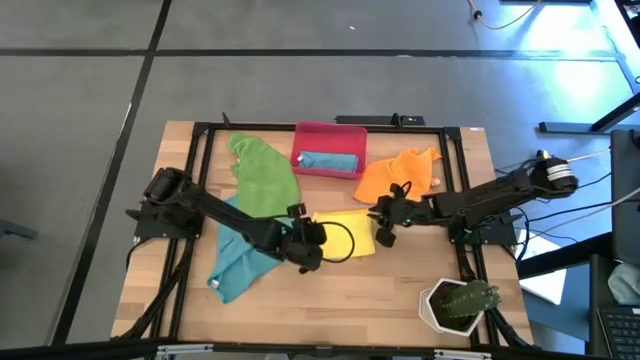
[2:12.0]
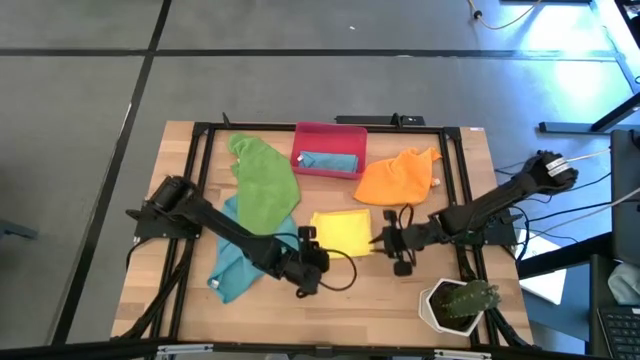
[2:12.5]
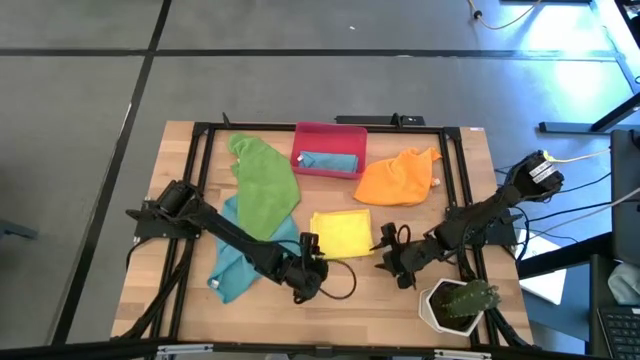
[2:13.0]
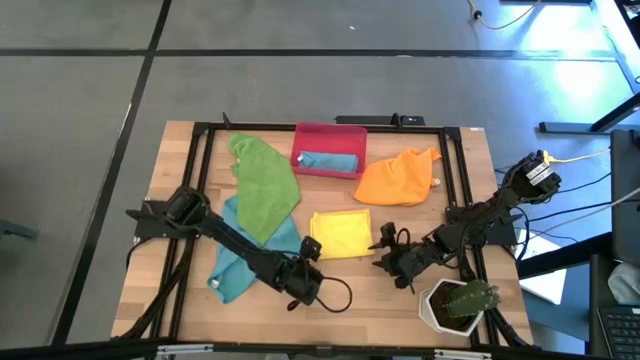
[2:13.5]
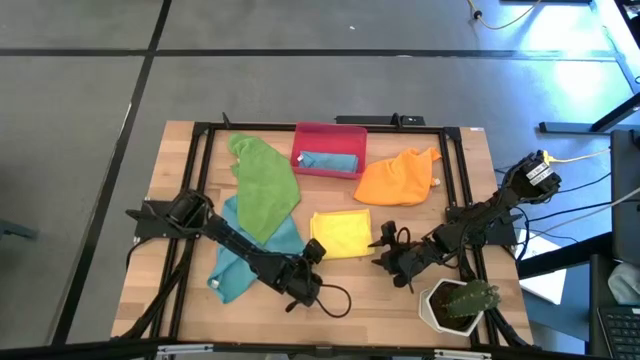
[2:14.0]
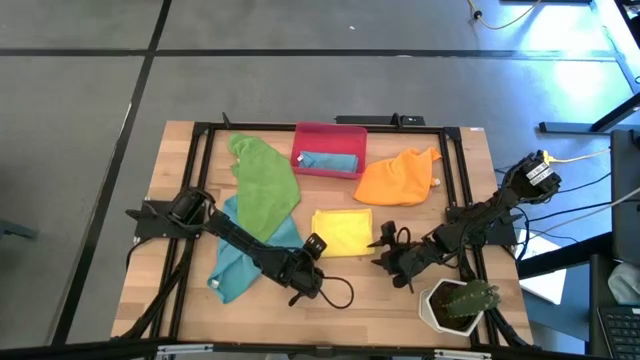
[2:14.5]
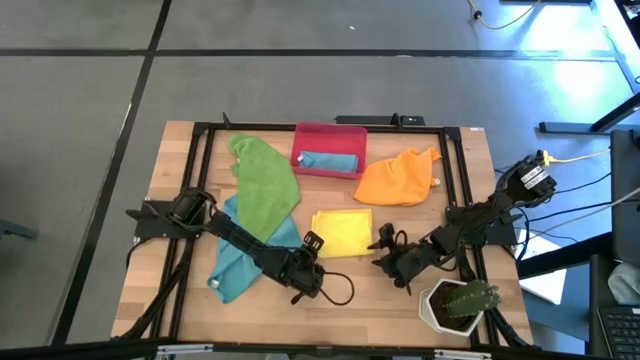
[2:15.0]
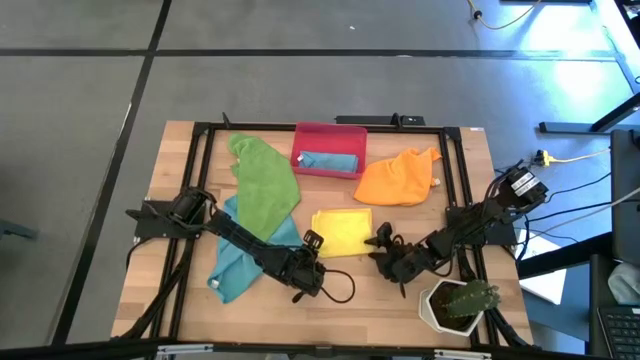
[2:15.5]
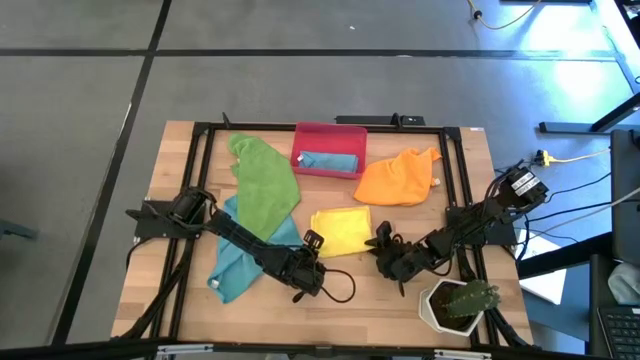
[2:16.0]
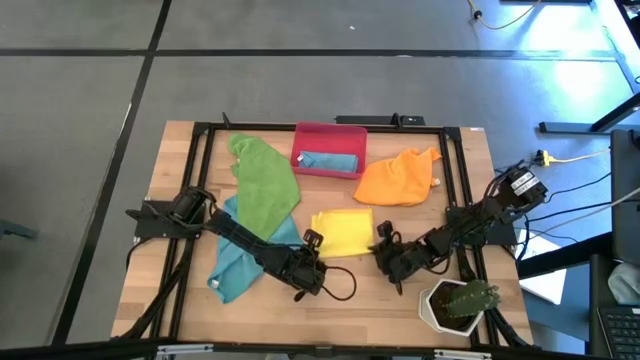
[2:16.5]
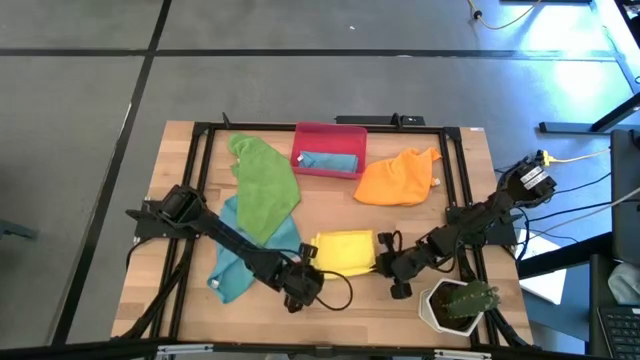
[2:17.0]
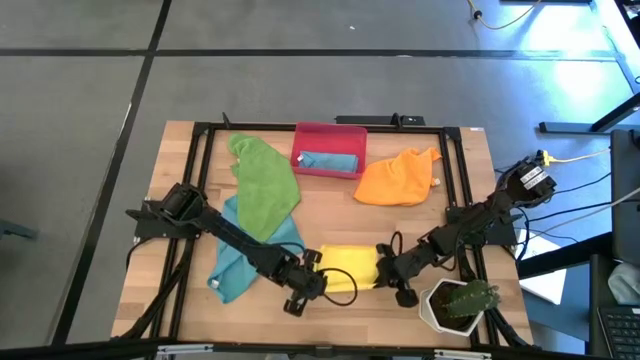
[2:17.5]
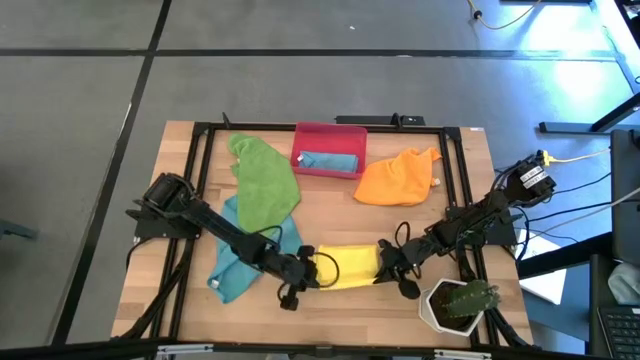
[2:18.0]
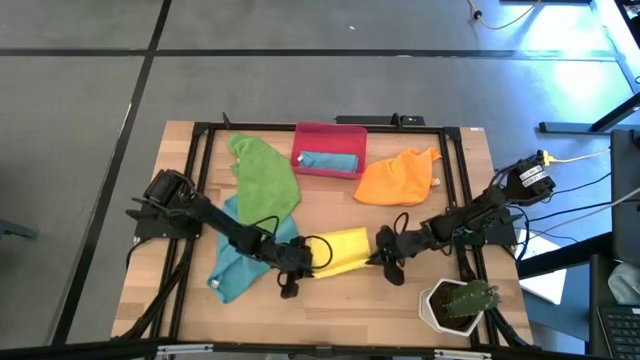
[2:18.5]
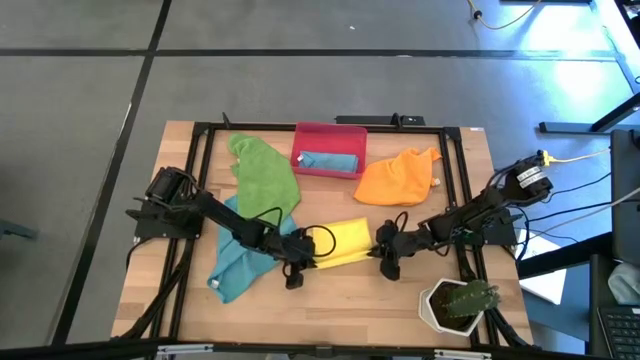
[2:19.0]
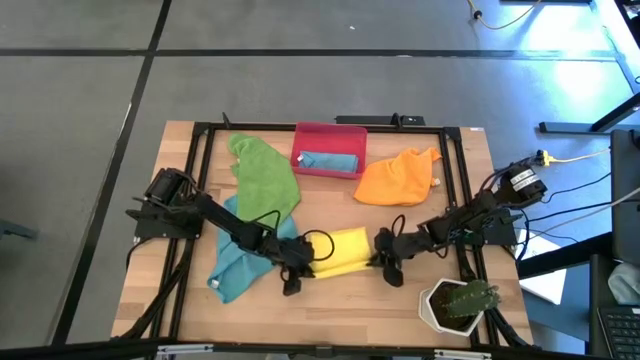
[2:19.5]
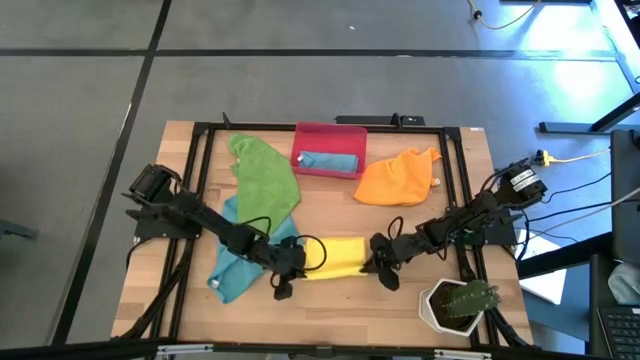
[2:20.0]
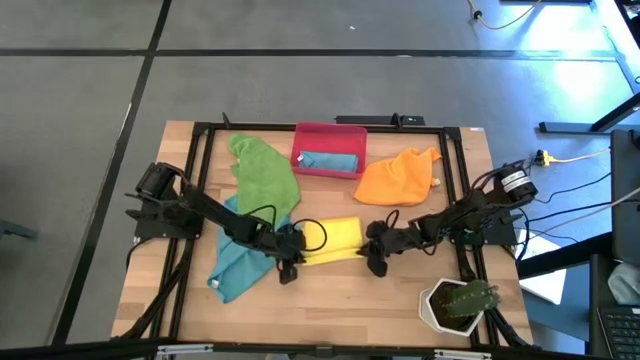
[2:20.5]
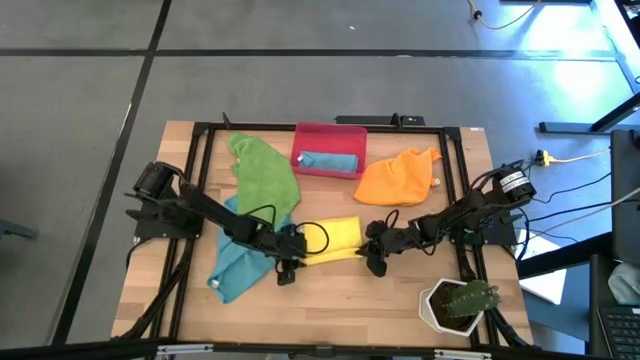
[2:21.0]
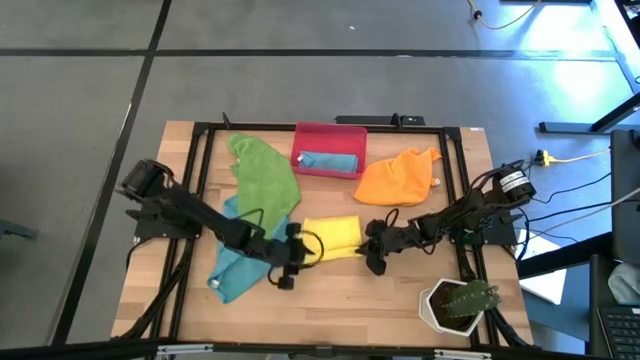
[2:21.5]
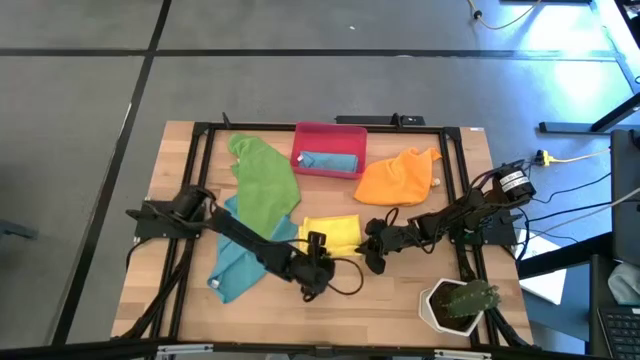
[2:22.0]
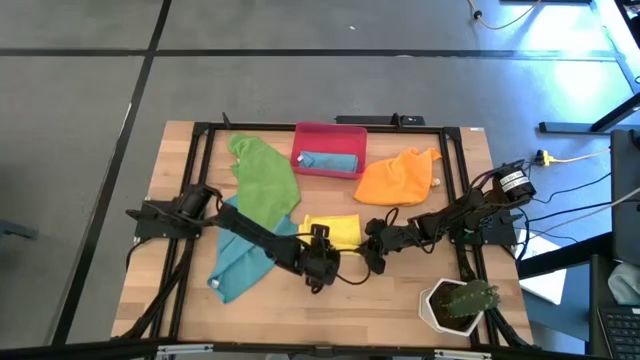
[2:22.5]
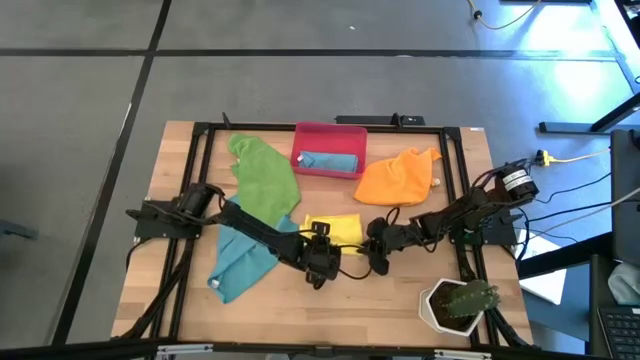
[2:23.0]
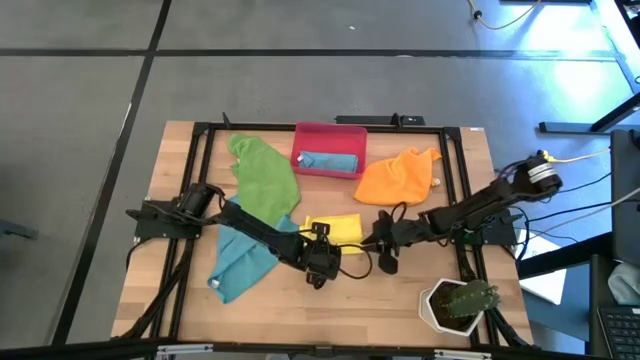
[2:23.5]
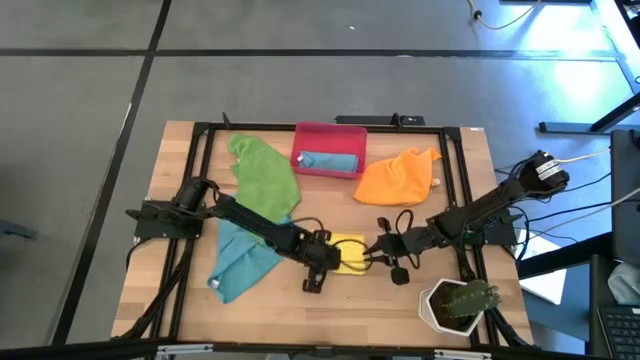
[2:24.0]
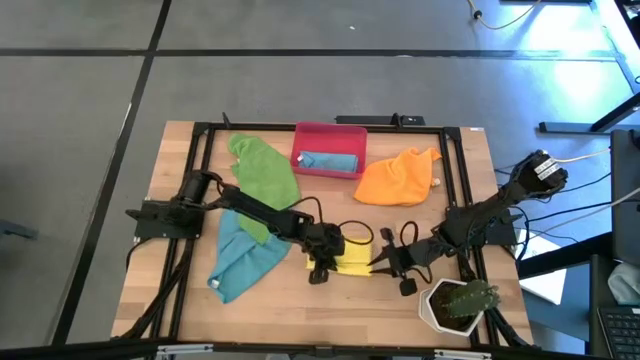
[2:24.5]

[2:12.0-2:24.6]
Task: Roll microfiber towels into tight, uniform cylinder then place into a basket
Roll the yellow microfiber towel

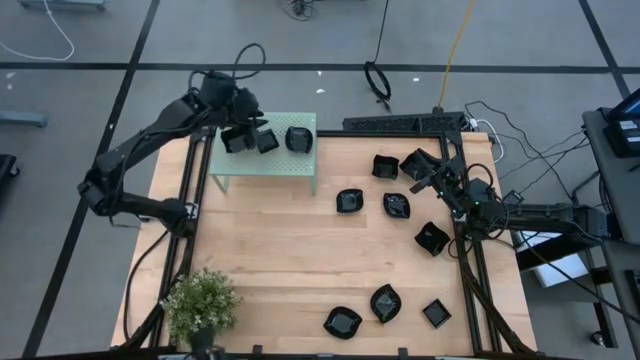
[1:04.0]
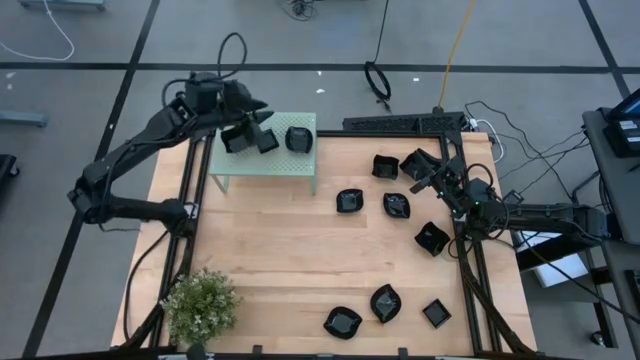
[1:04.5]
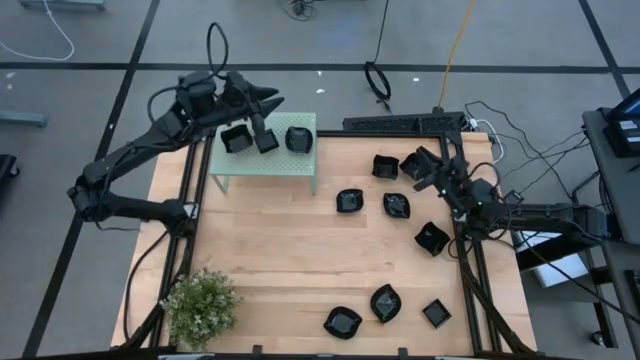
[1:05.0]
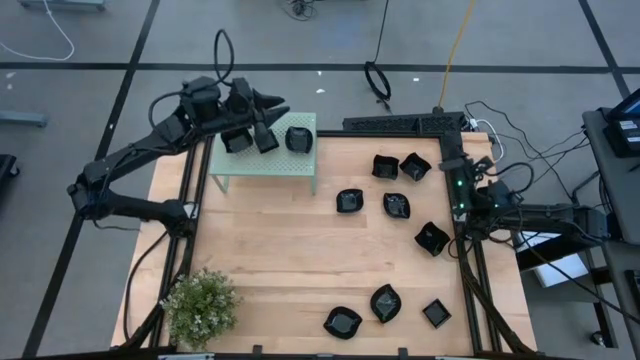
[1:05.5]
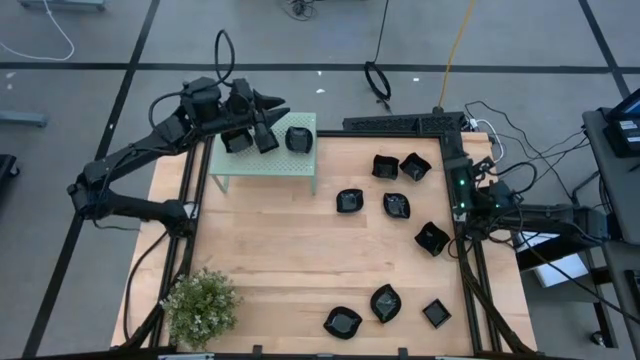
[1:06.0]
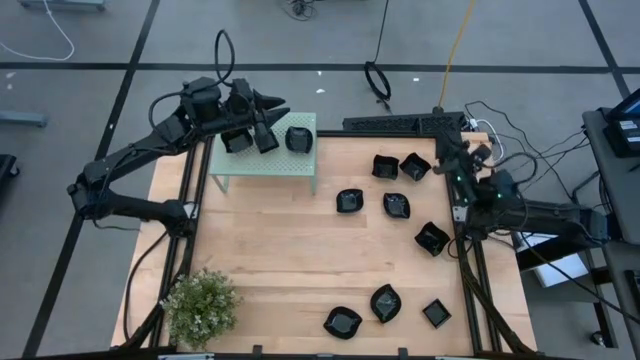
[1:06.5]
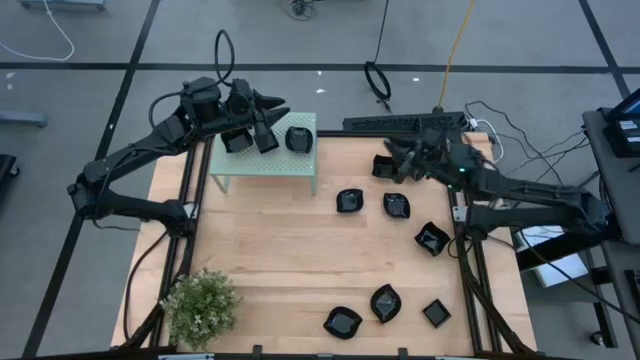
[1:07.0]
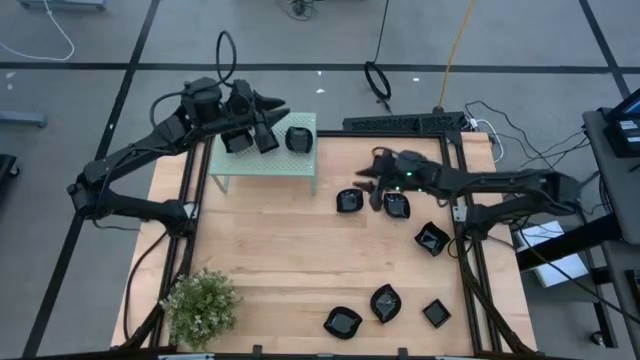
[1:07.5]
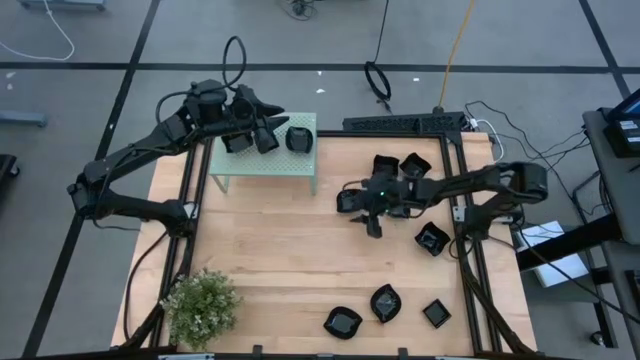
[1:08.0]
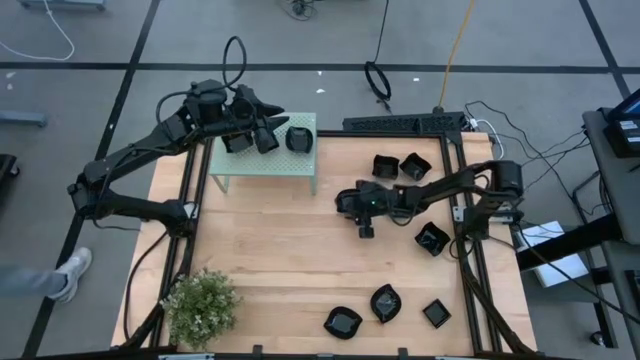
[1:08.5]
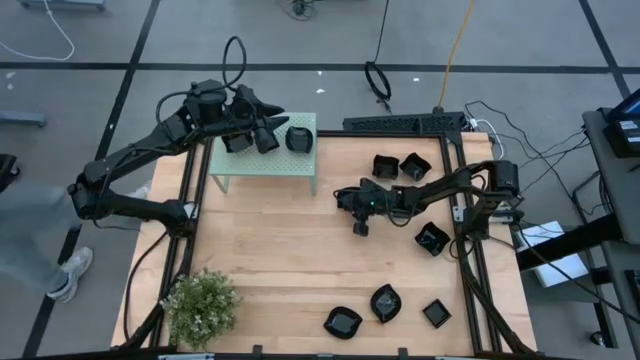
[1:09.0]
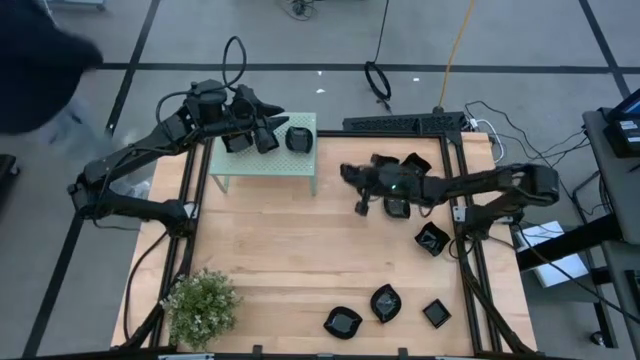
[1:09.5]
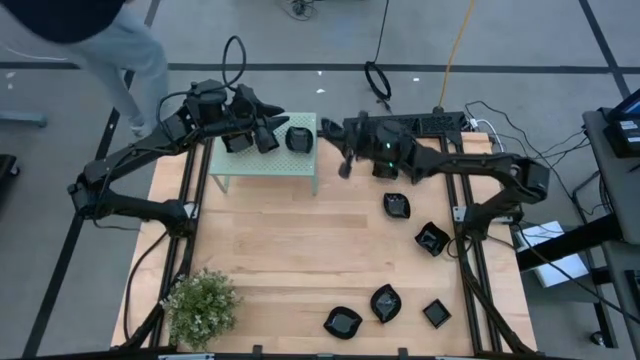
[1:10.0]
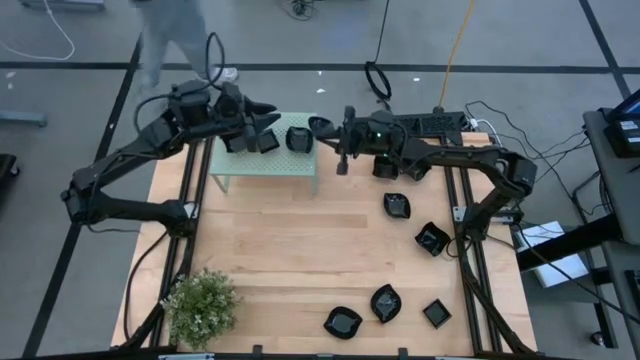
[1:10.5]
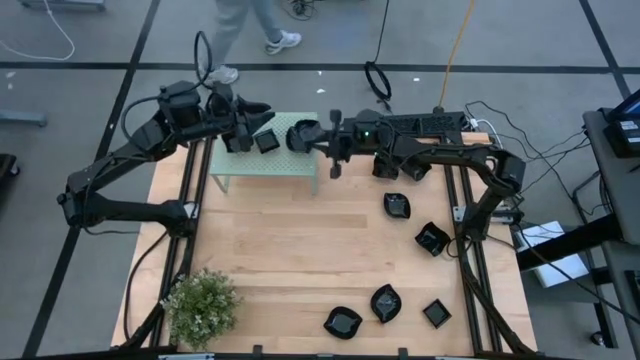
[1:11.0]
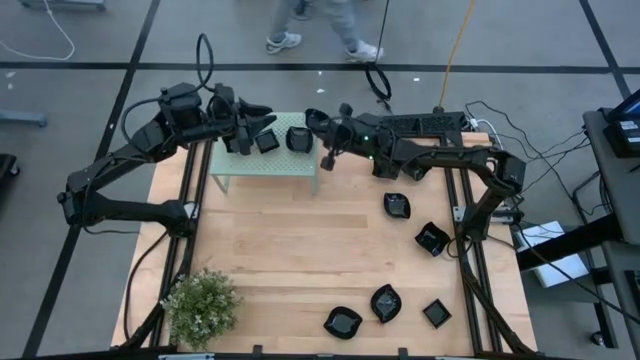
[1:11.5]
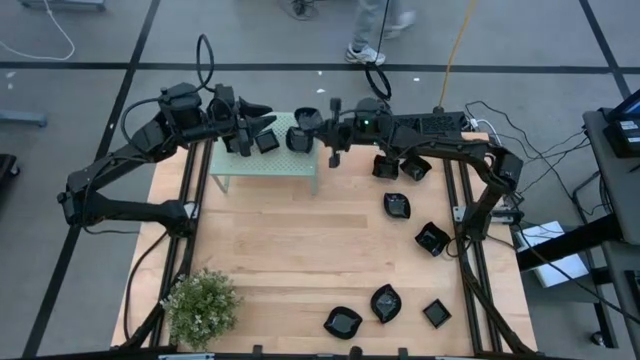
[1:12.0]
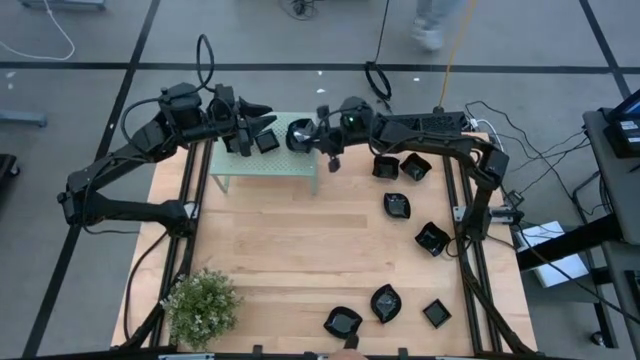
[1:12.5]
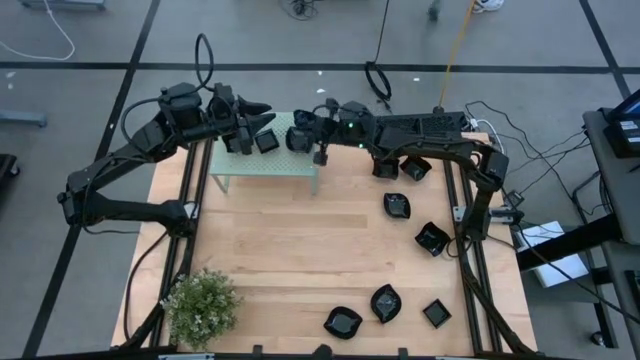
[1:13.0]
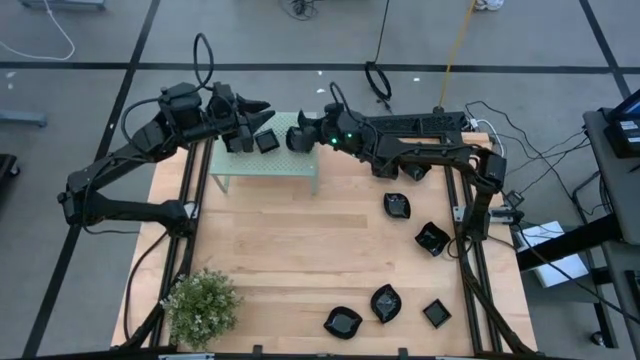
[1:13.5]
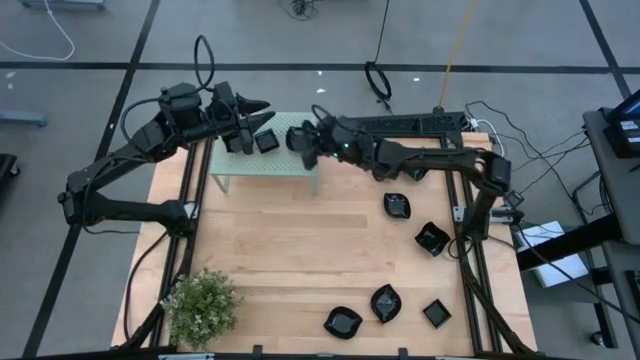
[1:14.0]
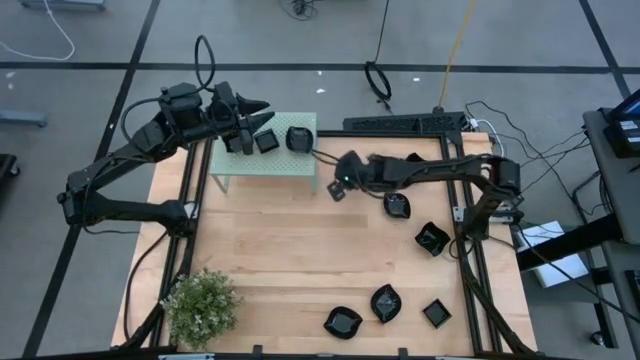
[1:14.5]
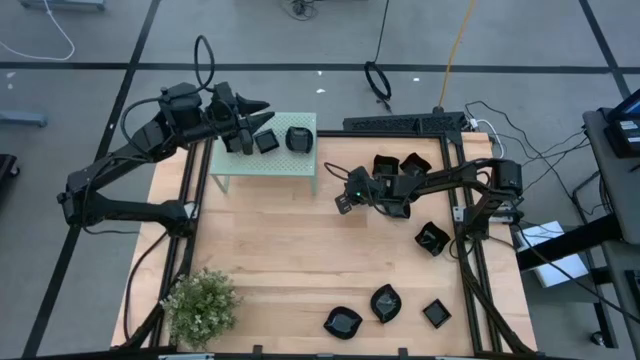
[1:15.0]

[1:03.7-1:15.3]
Task: Pick & Place Mini shaped plates
Stack the leaf shaped plate on top of the leaf shaped plate on the shelf
